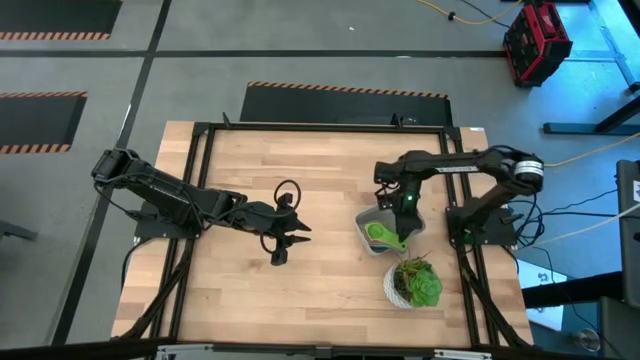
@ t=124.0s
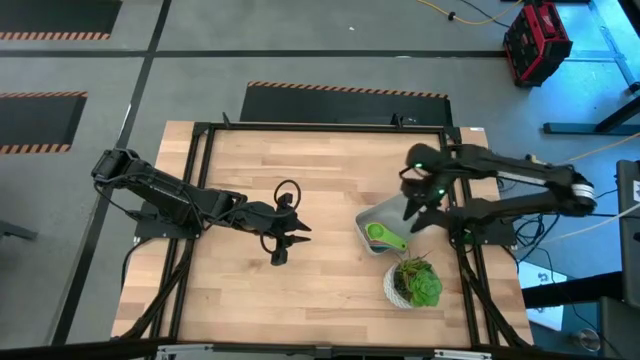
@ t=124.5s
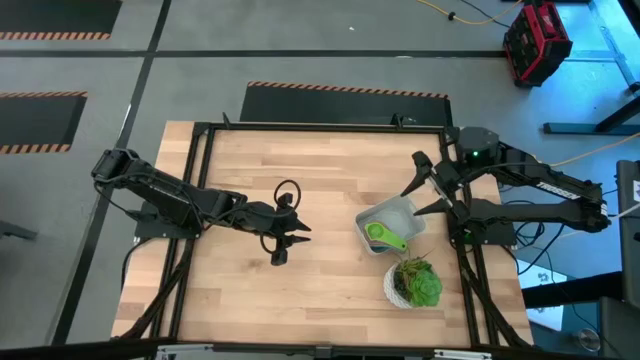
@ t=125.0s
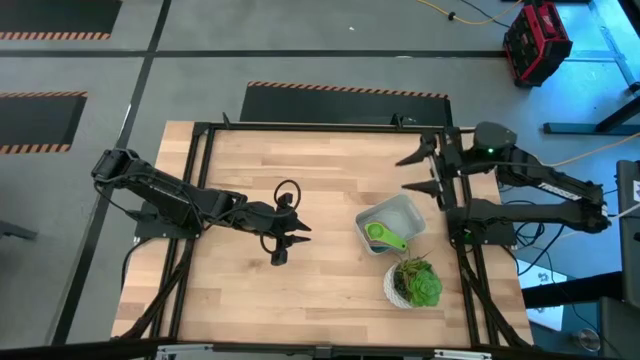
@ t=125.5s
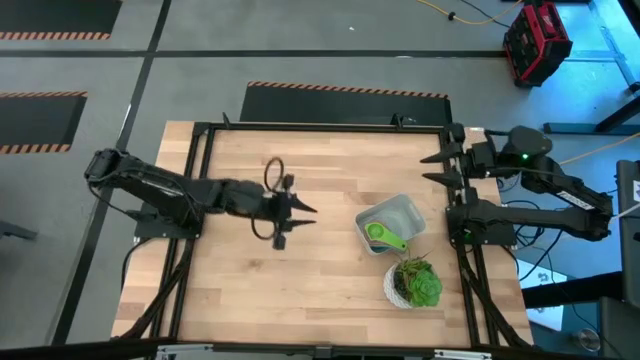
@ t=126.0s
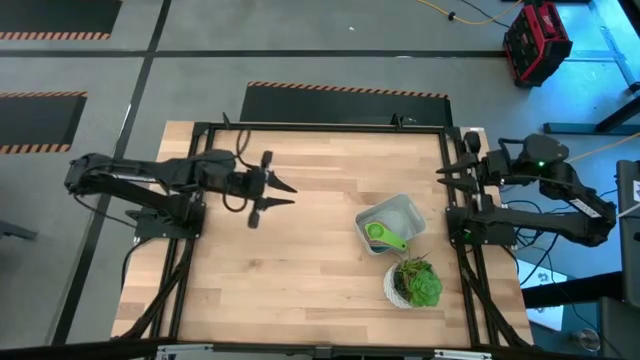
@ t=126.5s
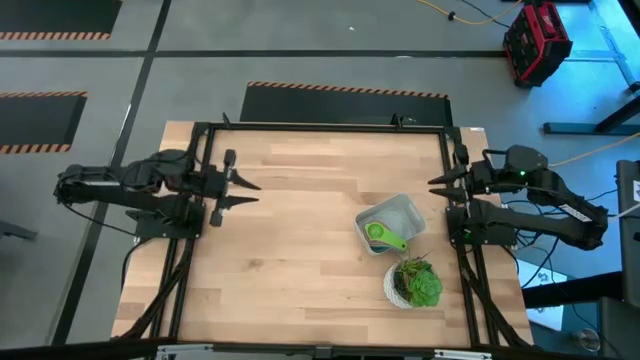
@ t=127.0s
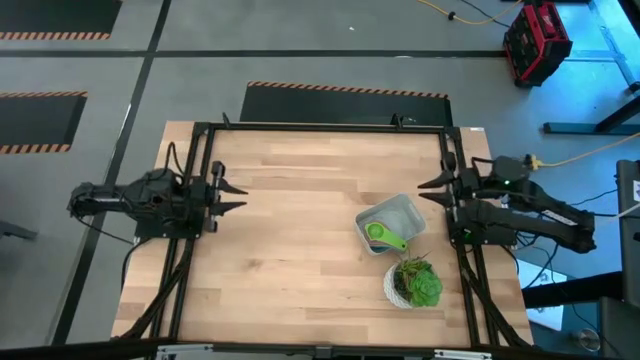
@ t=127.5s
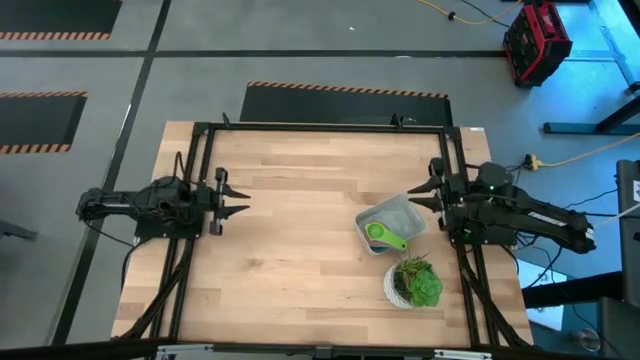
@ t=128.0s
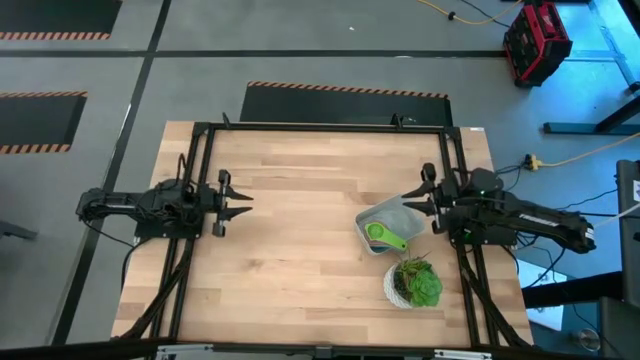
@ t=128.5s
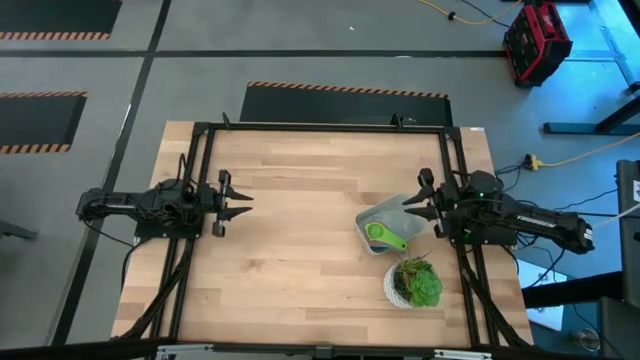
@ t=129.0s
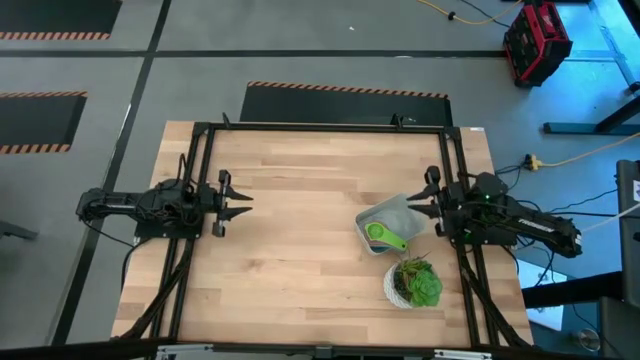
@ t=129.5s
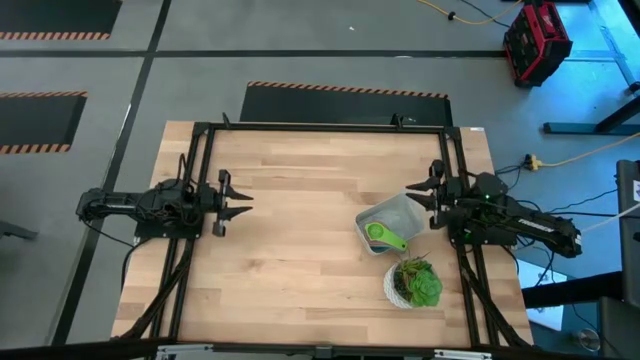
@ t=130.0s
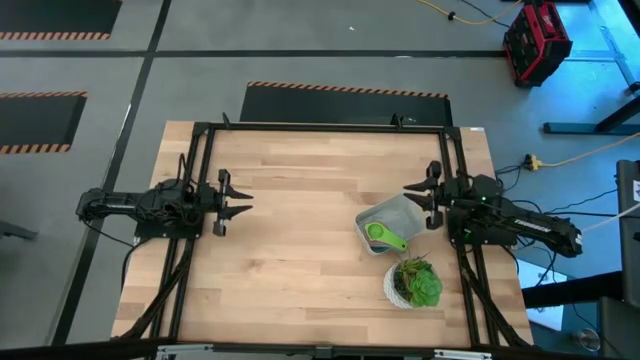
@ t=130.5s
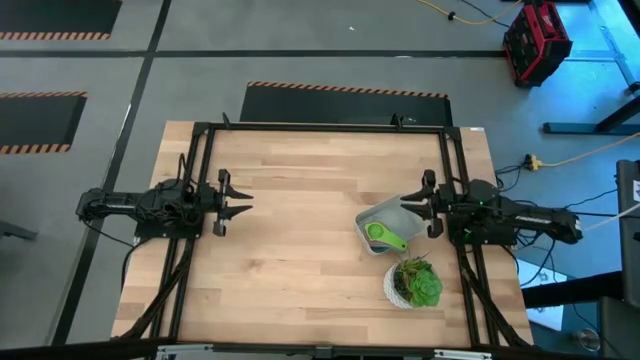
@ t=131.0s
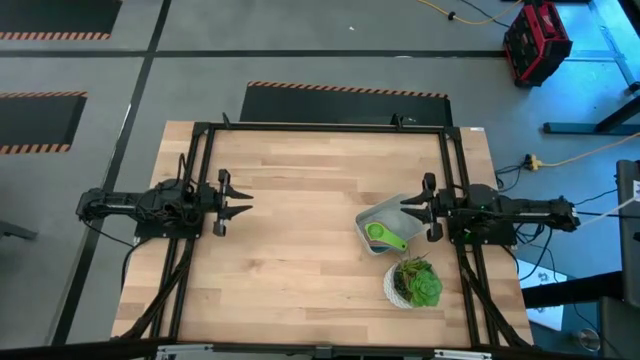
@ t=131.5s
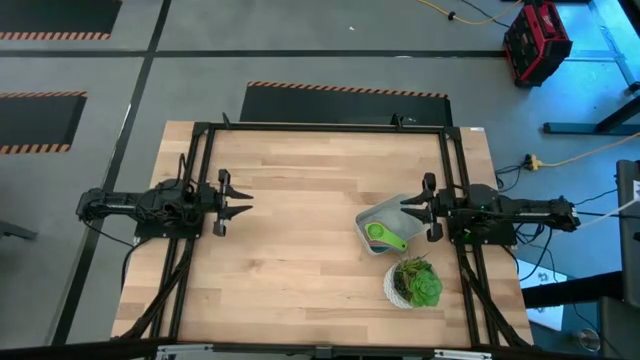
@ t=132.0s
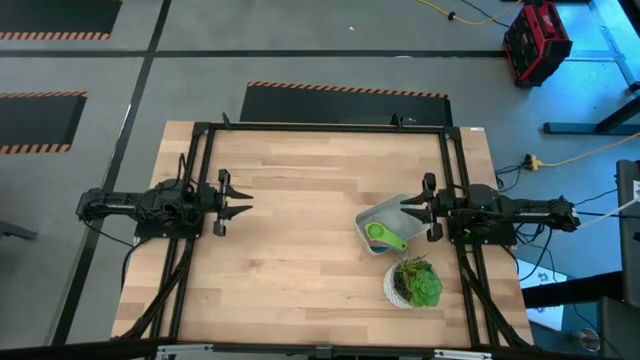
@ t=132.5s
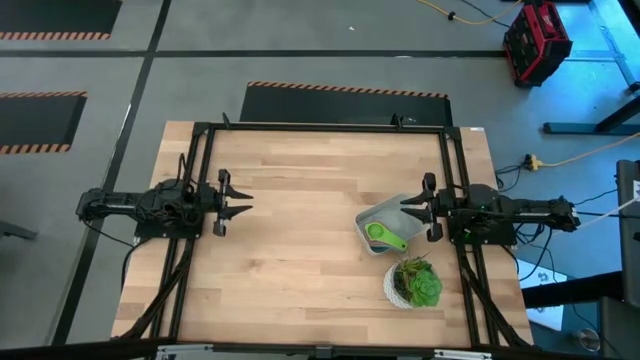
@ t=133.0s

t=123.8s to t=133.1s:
Task: Nest measuring cups in basket
Return to Home Position
